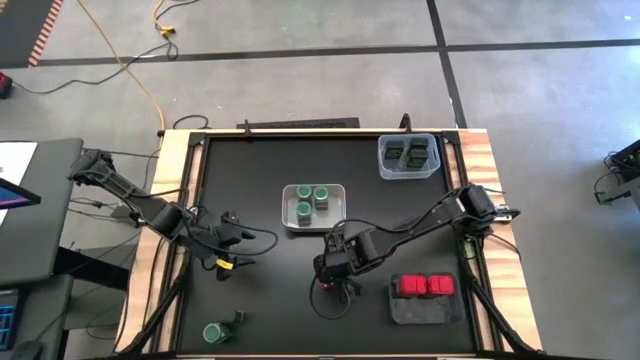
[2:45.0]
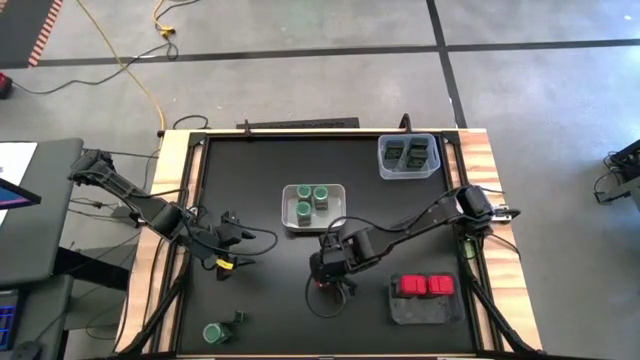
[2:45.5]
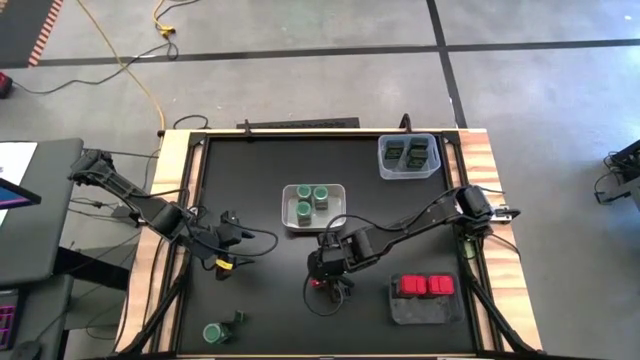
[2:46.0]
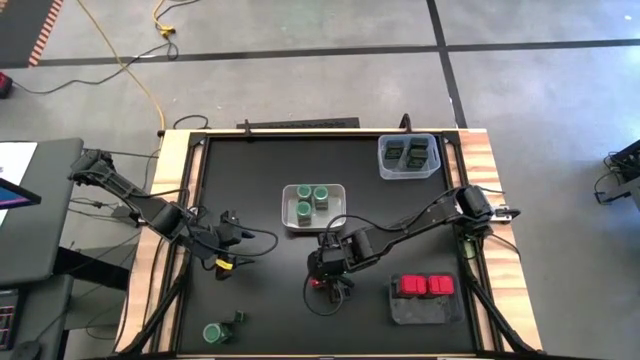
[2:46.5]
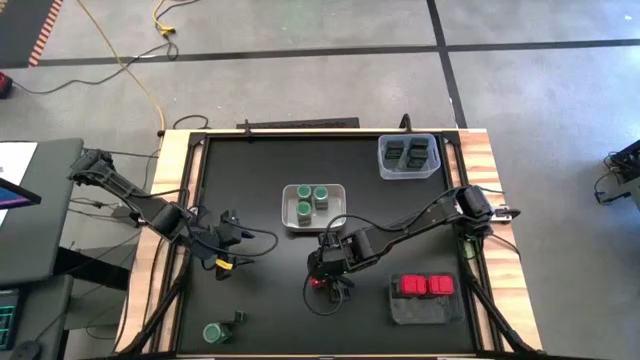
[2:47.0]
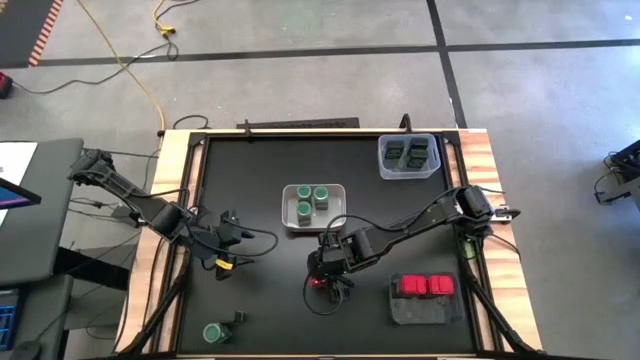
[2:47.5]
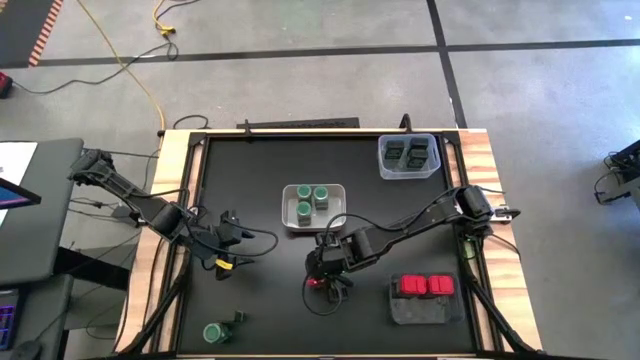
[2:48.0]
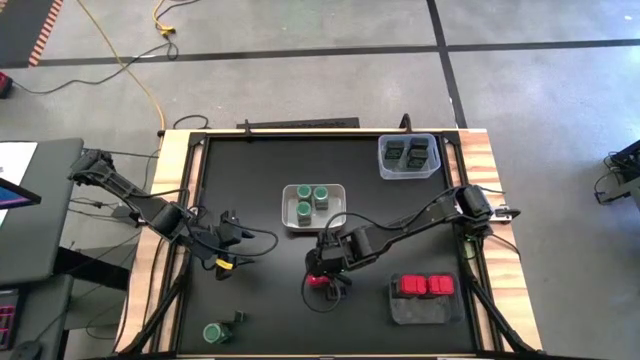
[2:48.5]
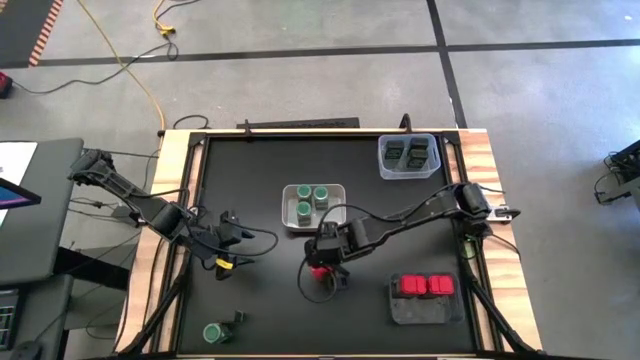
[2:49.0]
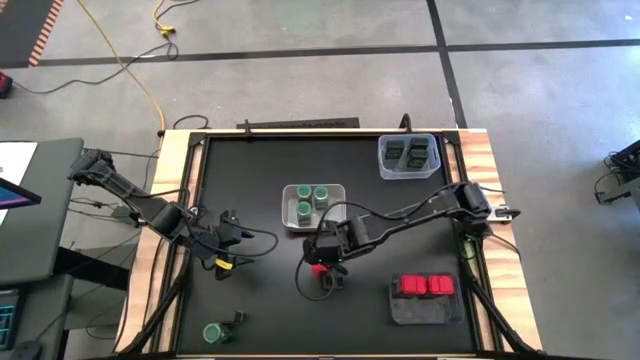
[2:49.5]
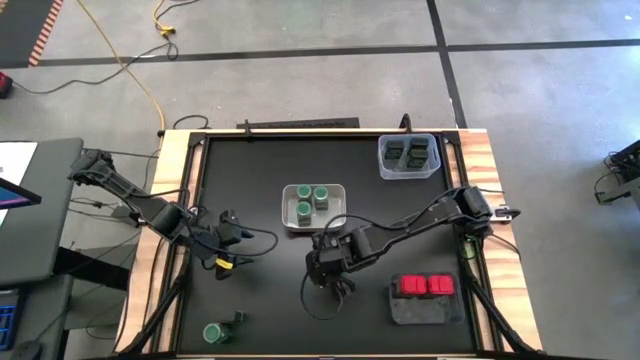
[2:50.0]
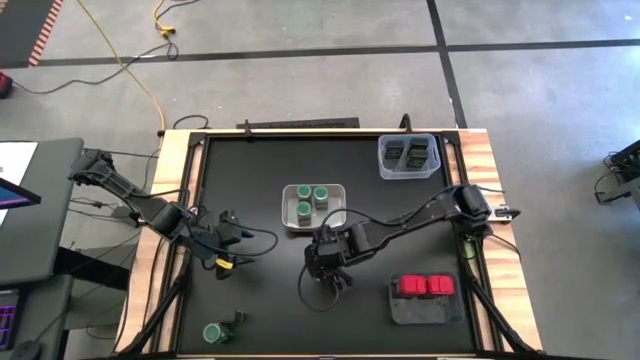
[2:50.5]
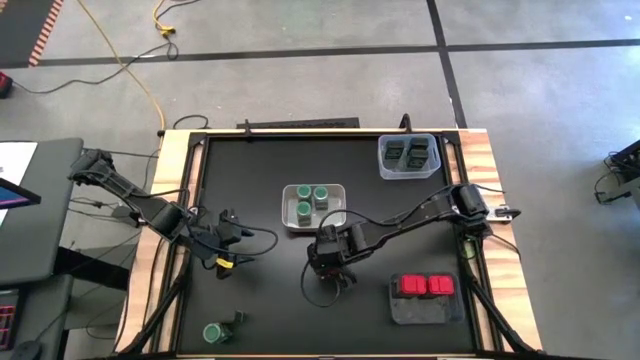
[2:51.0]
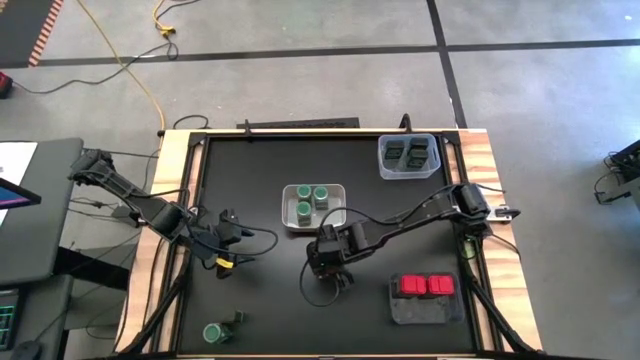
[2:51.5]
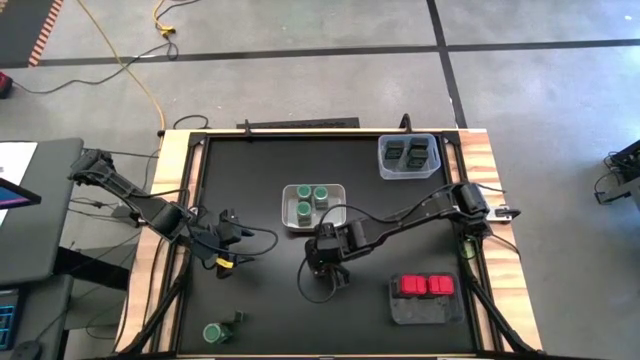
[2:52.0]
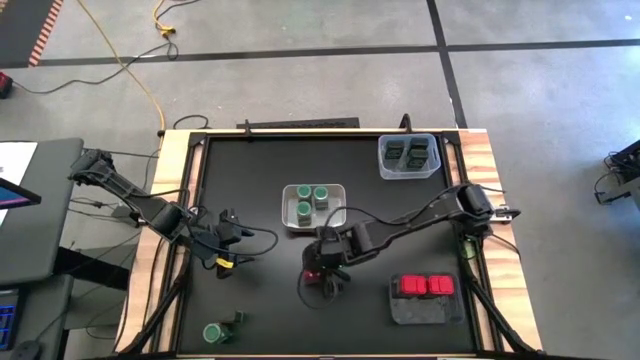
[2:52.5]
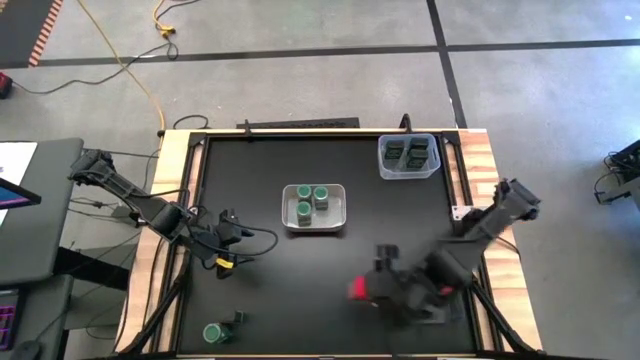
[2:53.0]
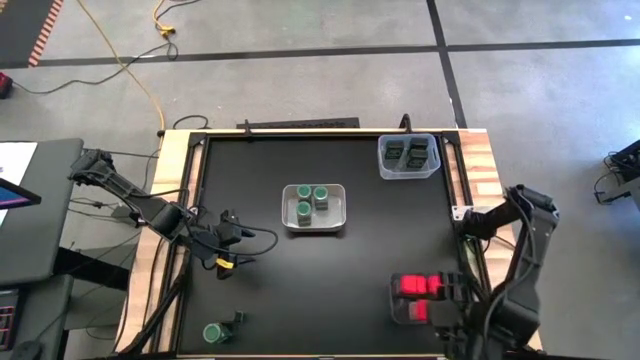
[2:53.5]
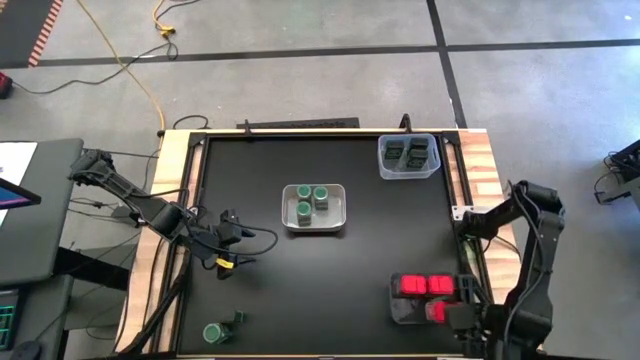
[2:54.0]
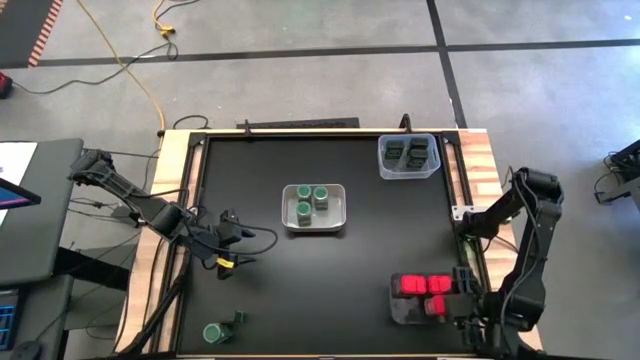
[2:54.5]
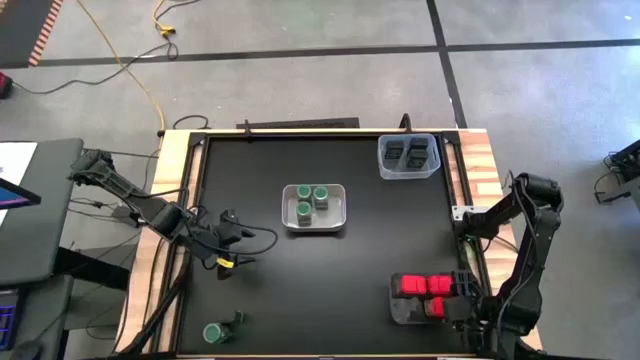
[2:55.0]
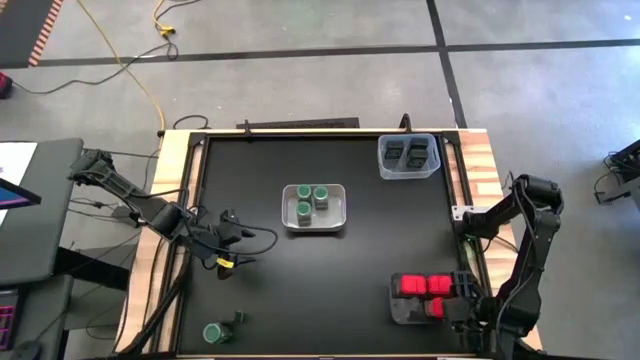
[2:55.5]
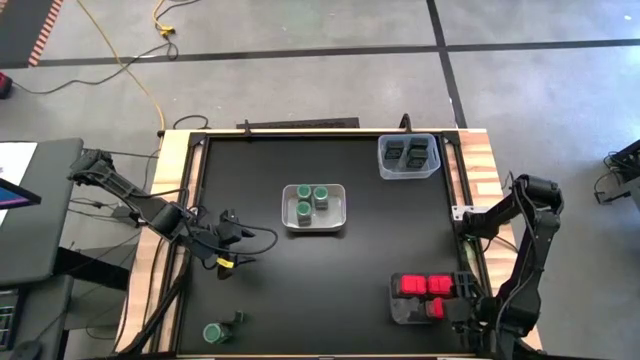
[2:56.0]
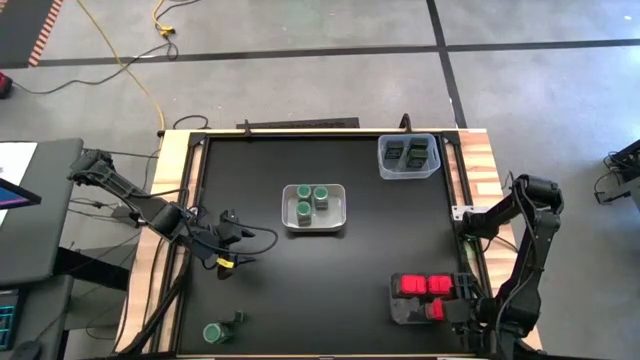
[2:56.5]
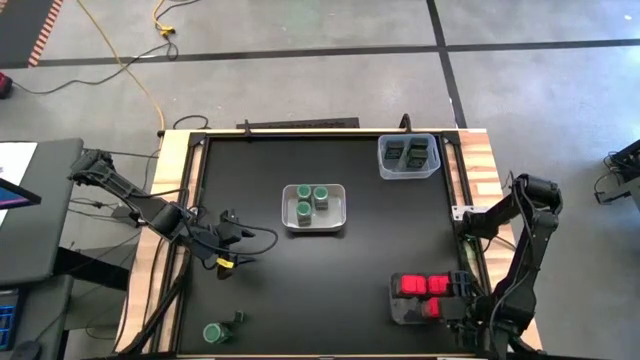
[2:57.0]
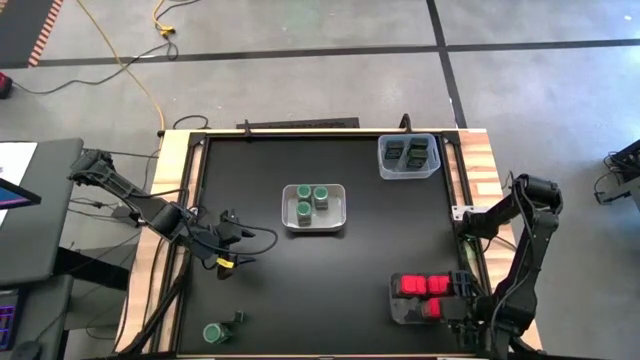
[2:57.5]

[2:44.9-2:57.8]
Task: Sort spices by type
Put the red seasoning can into the black bin

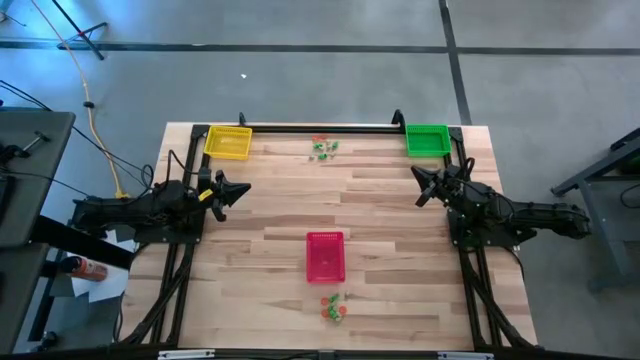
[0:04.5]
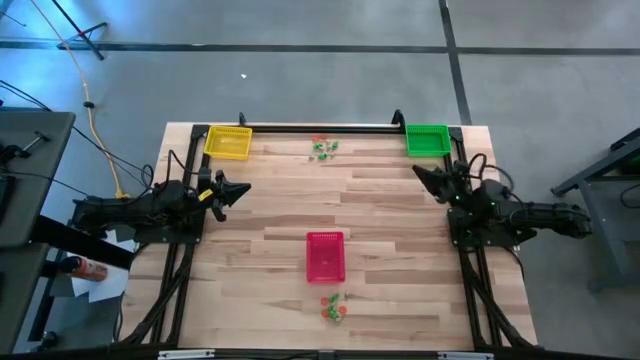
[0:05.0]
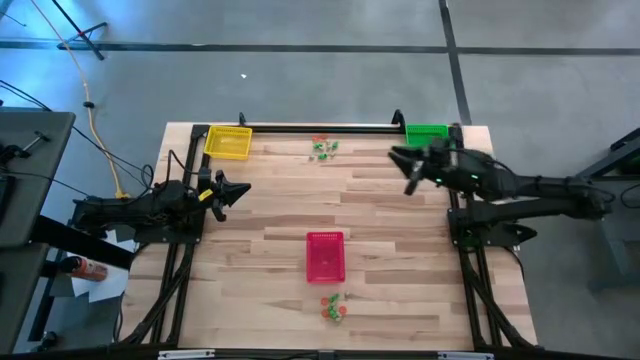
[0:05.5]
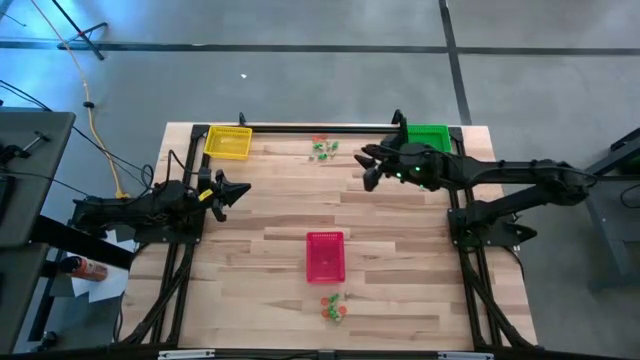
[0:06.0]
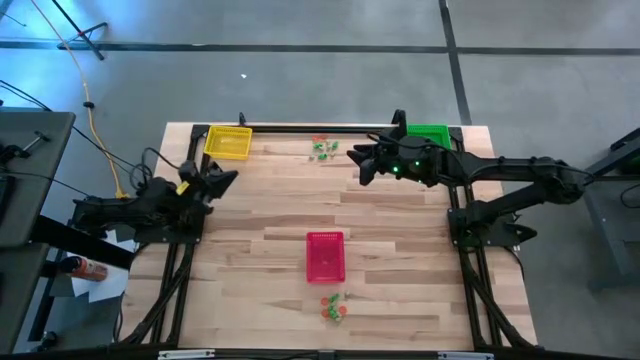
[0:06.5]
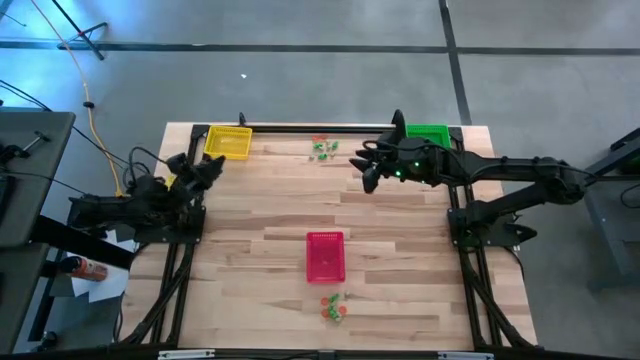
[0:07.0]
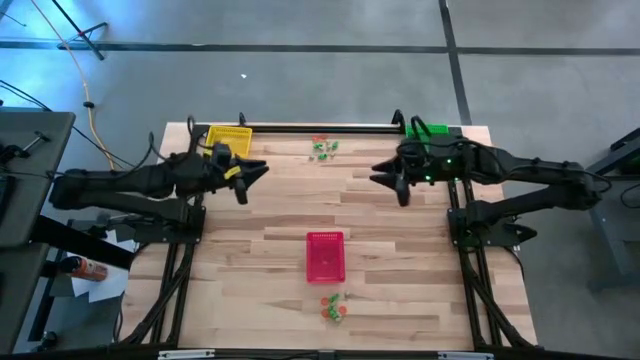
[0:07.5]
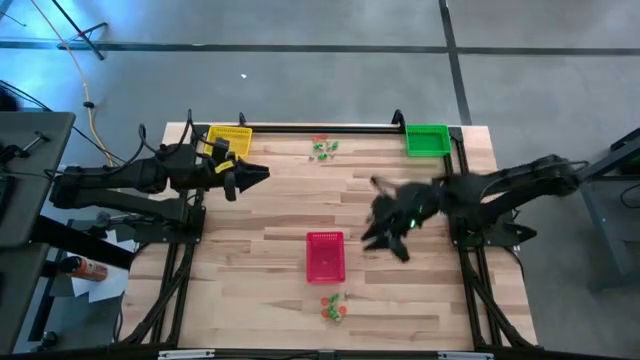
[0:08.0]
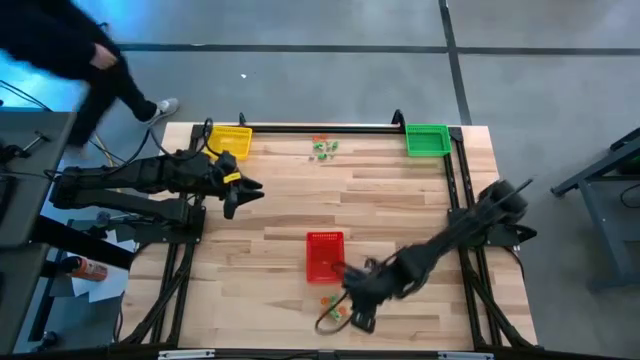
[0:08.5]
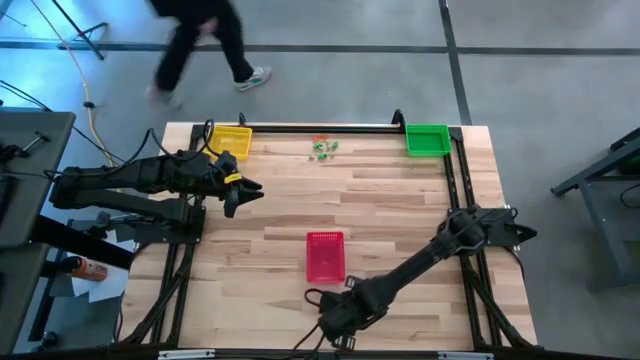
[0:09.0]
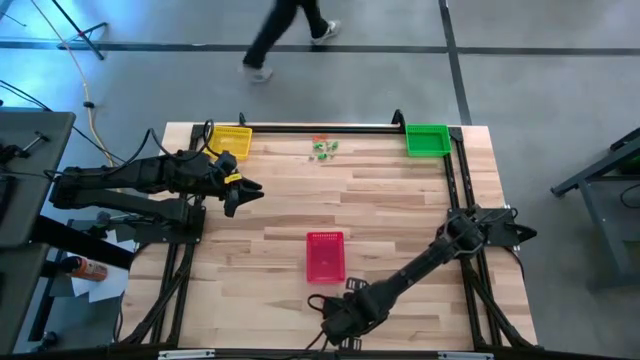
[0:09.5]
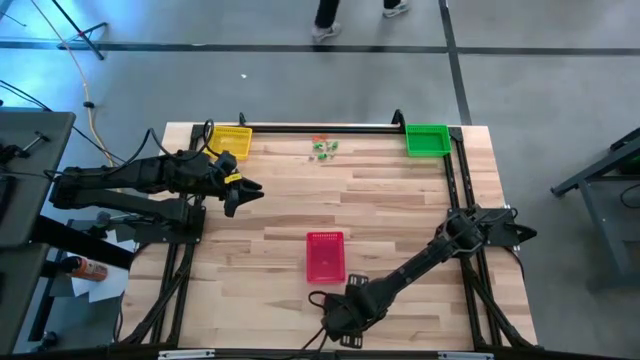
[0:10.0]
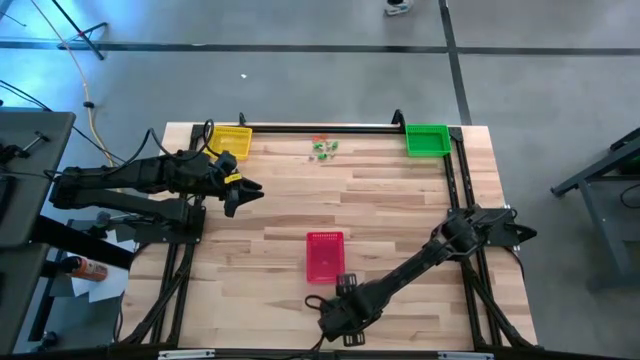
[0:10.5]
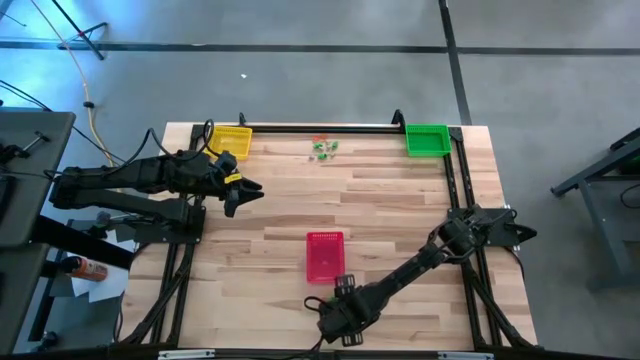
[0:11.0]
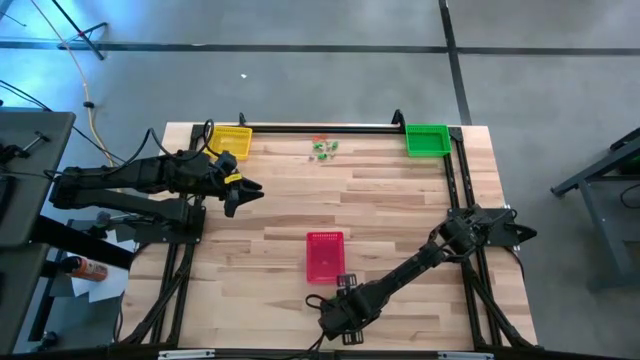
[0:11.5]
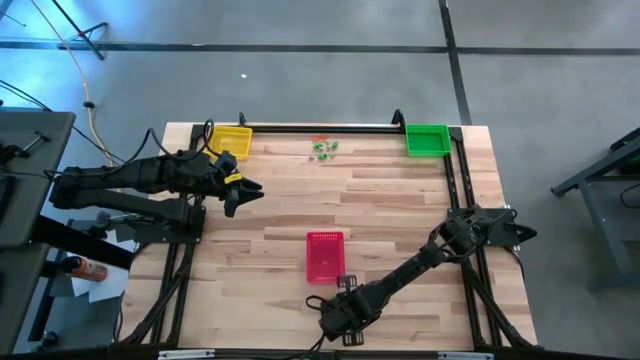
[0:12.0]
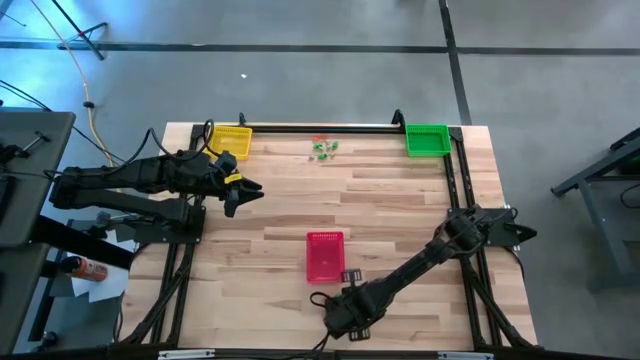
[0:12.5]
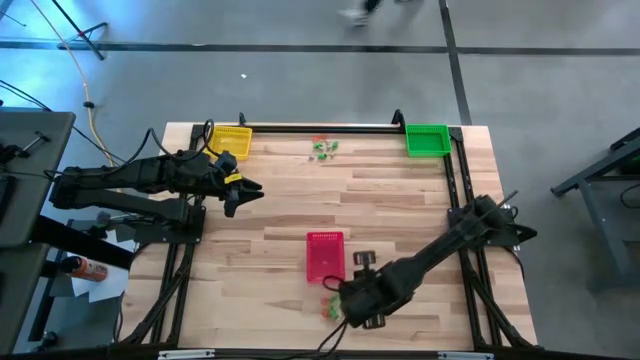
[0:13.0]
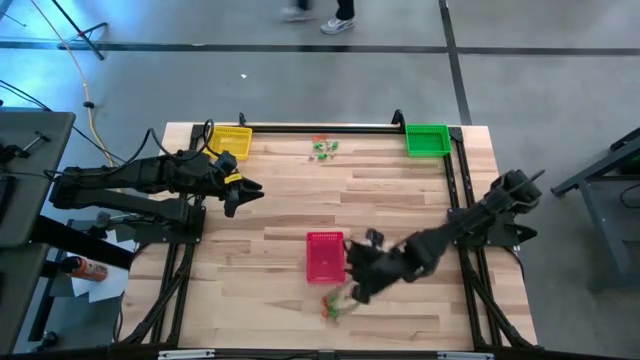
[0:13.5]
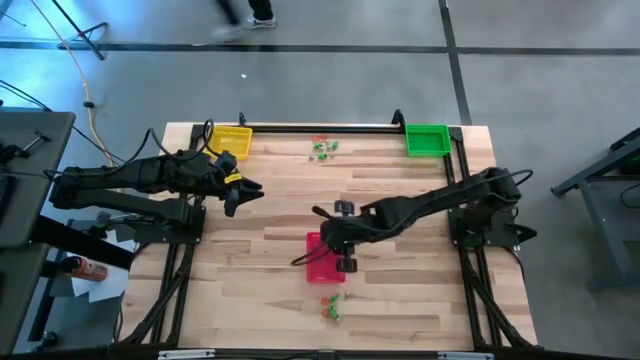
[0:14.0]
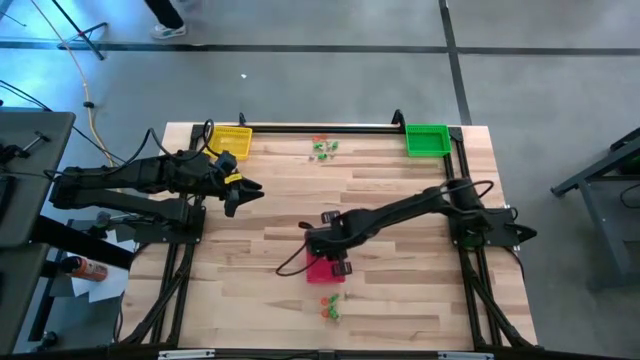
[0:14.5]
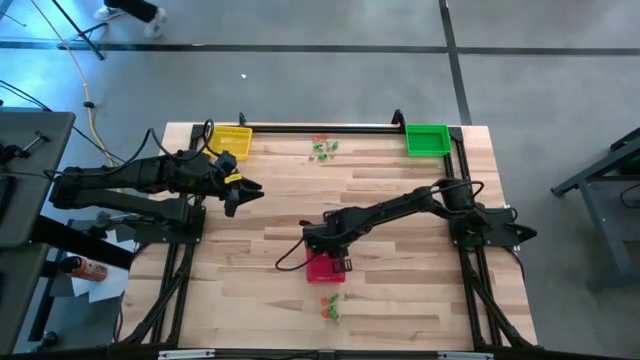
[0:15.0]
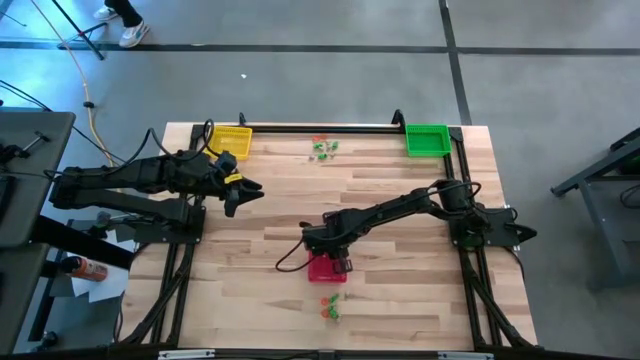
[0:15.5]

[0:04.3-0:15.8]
Task: Sort Halloween decoration
Put the orange pumpkin toy into the red bin
